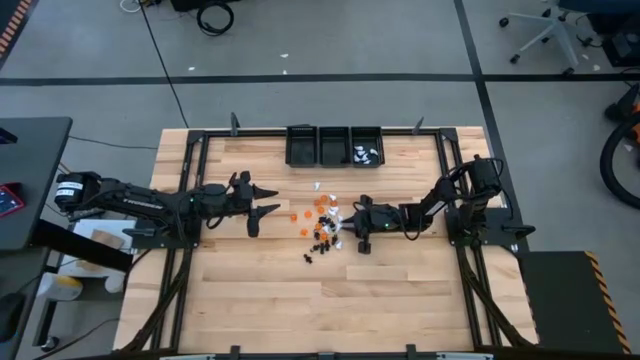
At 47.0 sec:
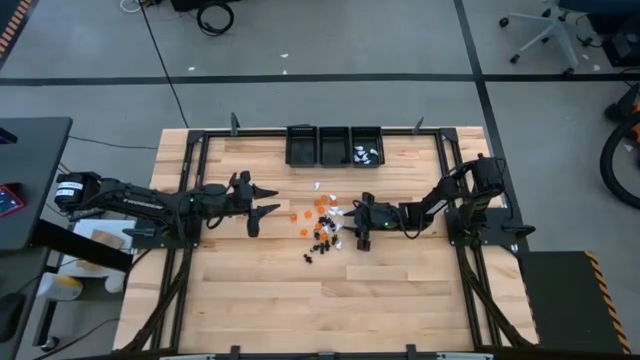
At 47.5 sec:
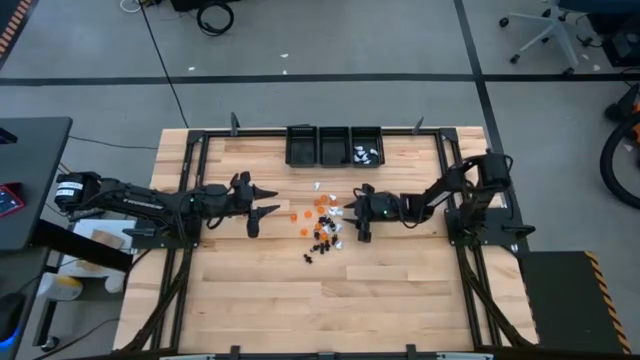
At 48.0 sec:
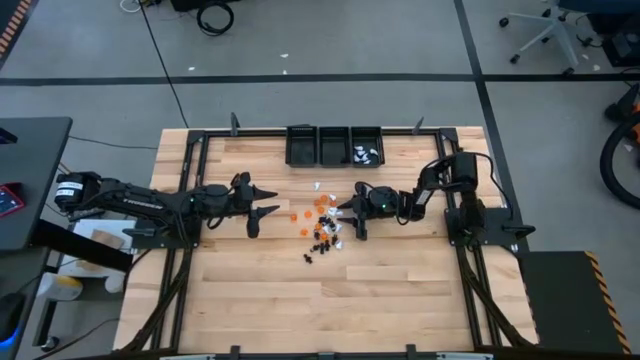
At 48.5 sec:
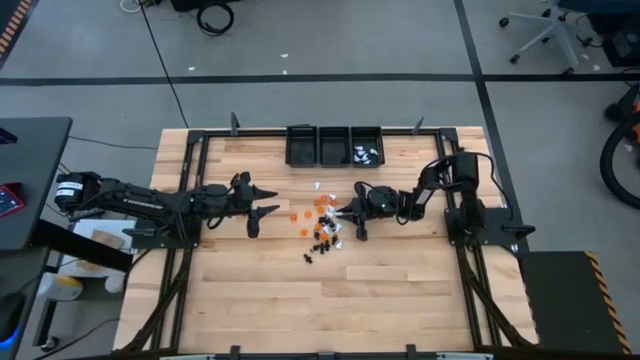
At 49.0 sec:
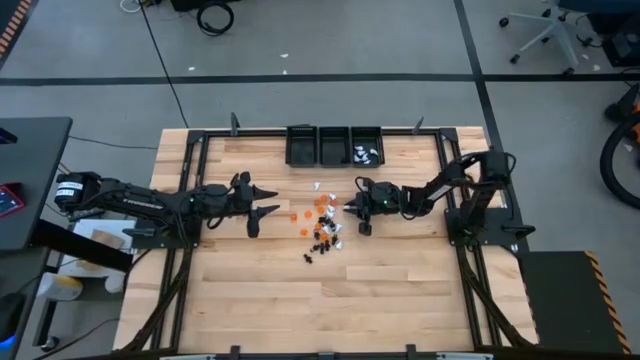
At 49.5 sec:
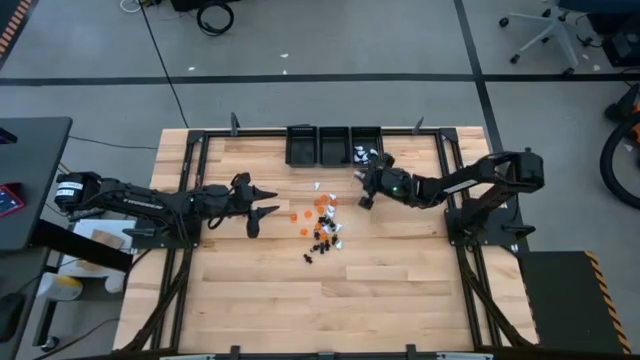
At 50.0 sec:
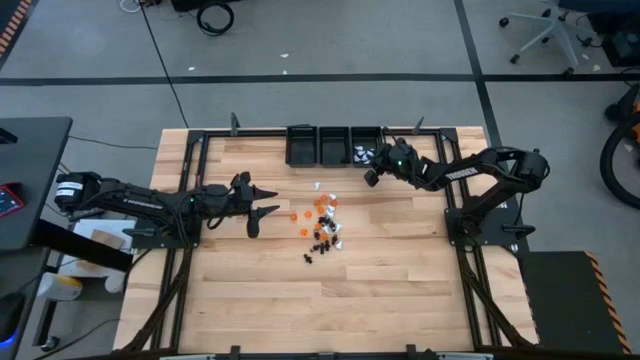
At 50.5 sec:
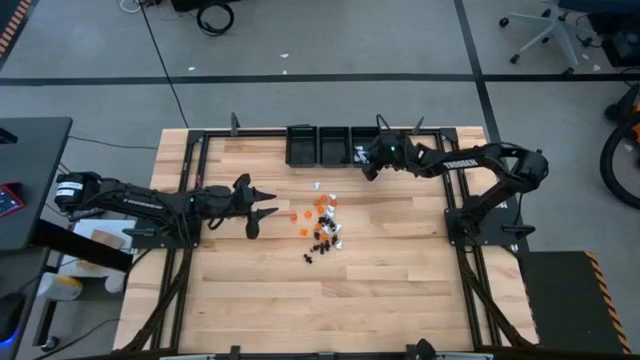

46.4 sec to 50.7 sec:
Task: Sort game pieces by color
Put the white game piece into the right black basket

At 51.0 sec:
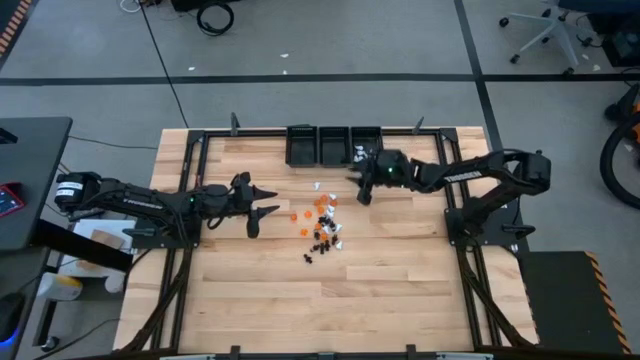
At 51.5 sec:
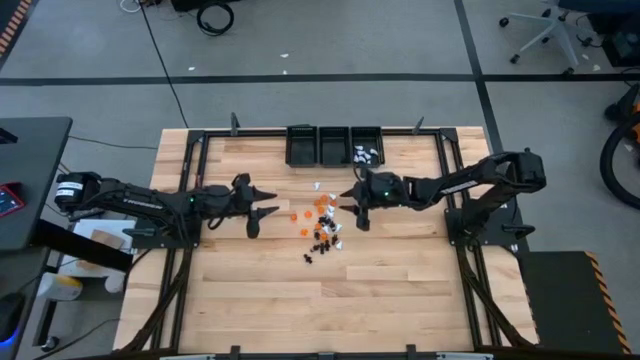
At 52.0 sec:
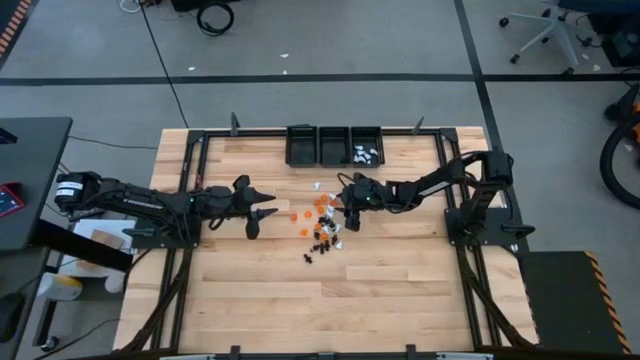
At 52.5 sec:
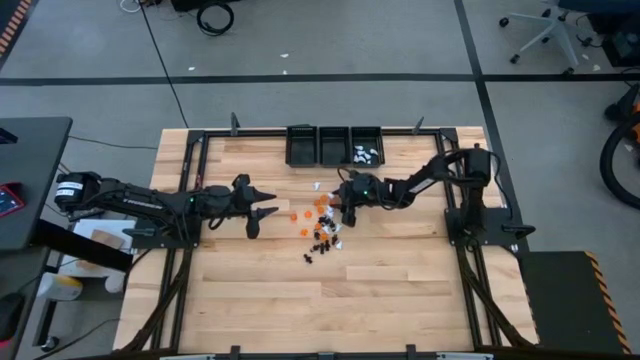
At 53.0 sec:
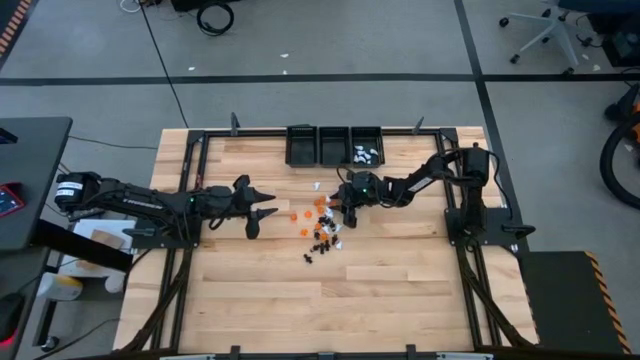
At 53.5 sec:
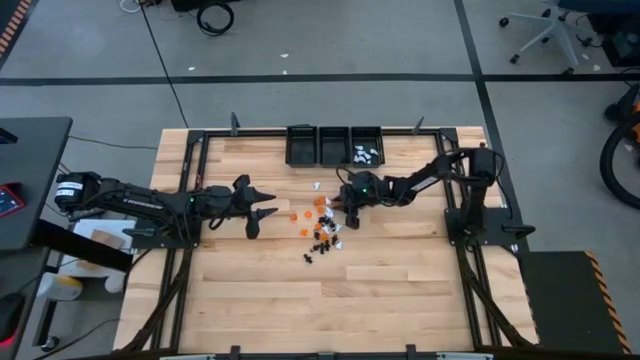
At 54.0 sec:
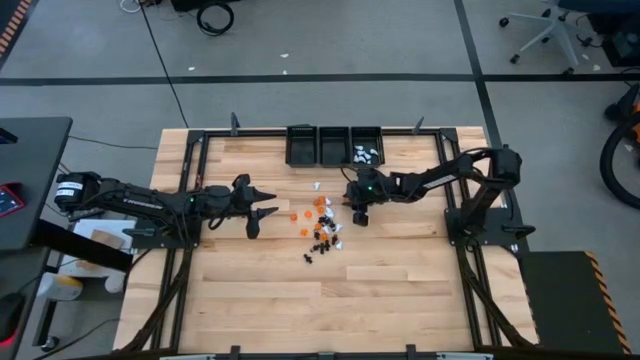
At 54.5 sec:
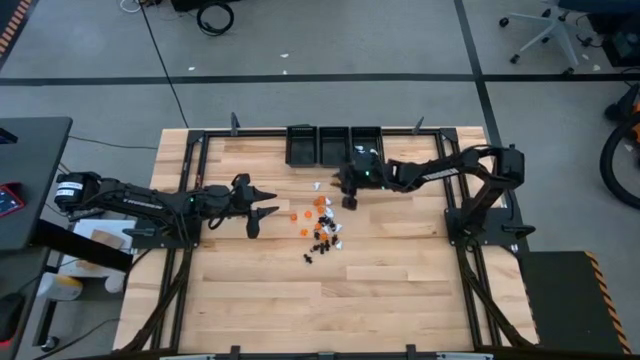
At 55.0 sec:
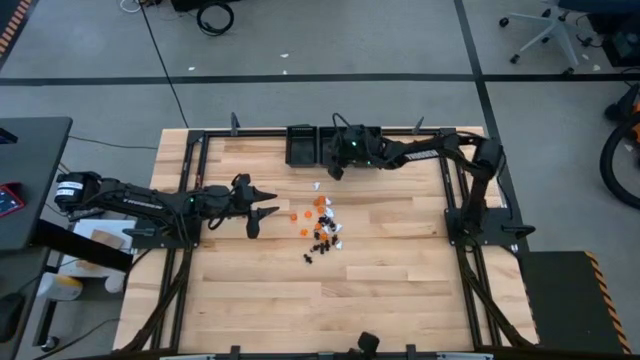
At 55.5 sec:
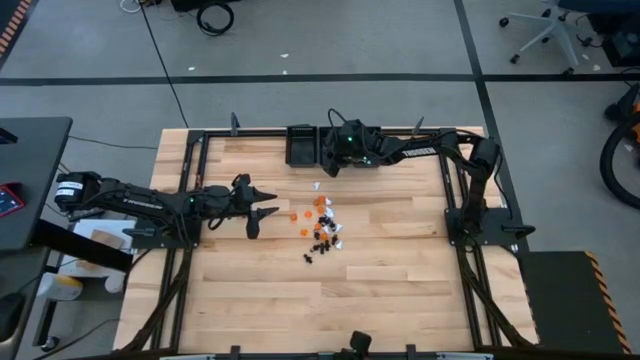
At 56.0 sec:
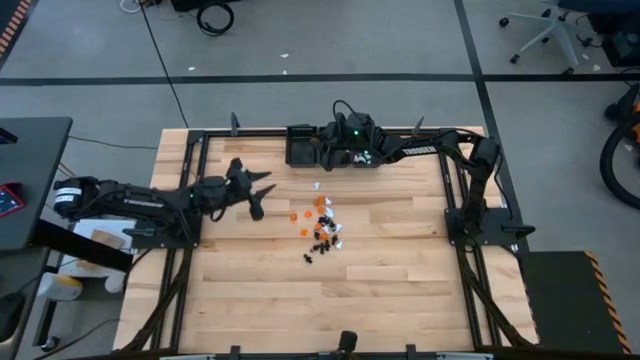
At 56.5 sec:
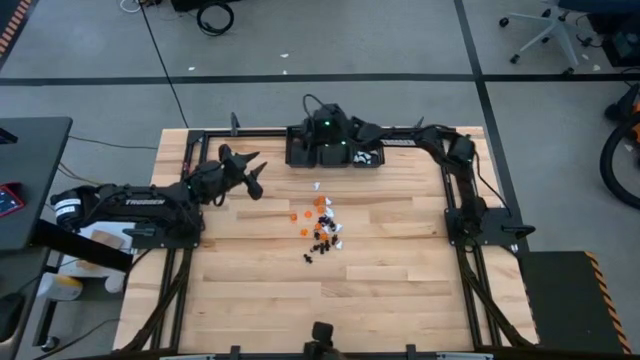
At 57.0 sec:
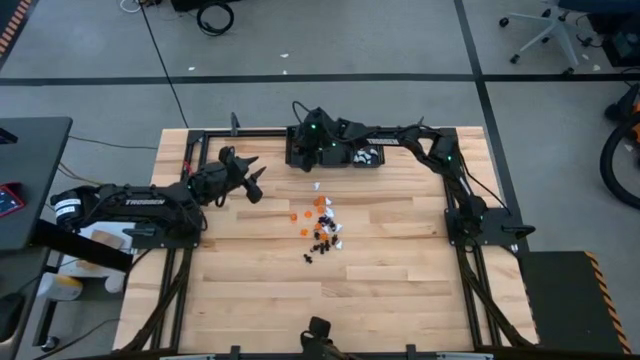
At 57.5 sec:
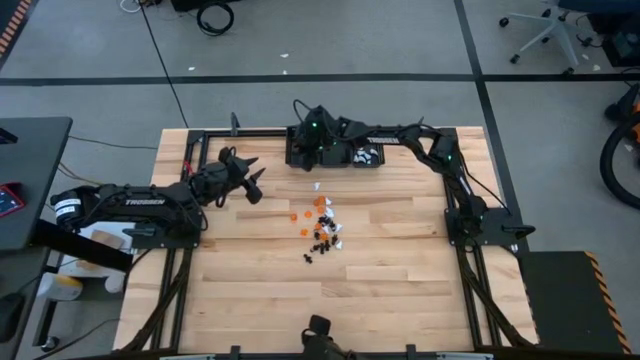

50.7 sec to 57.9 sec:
Put the orange game piece into the left black basket

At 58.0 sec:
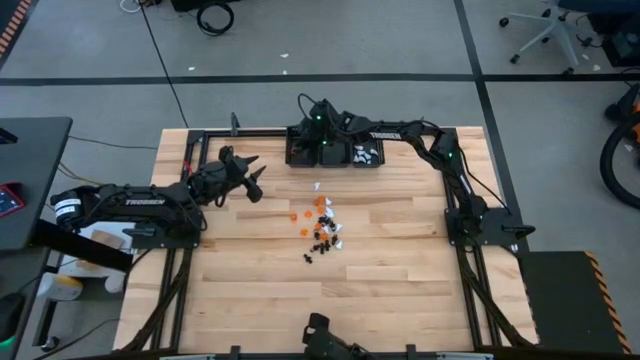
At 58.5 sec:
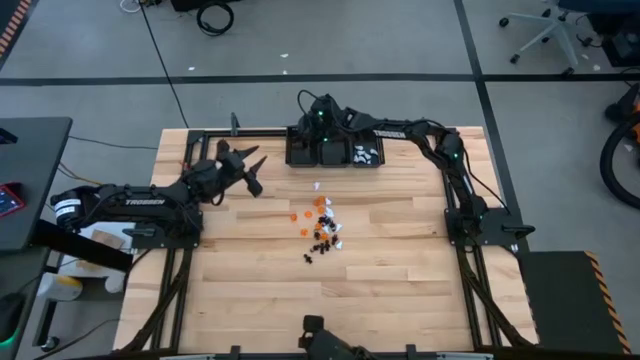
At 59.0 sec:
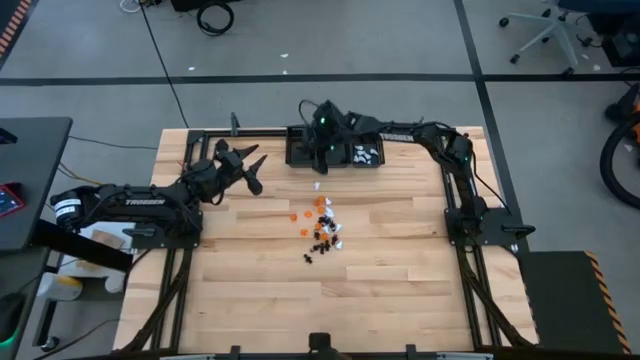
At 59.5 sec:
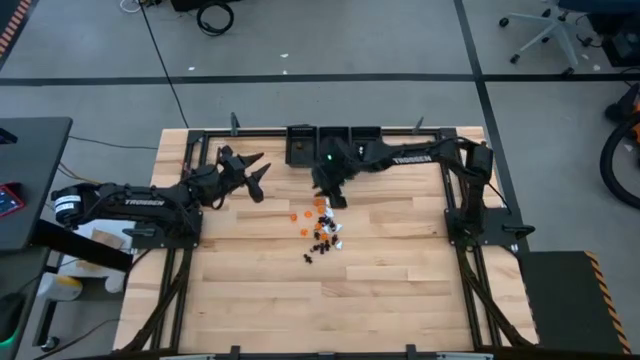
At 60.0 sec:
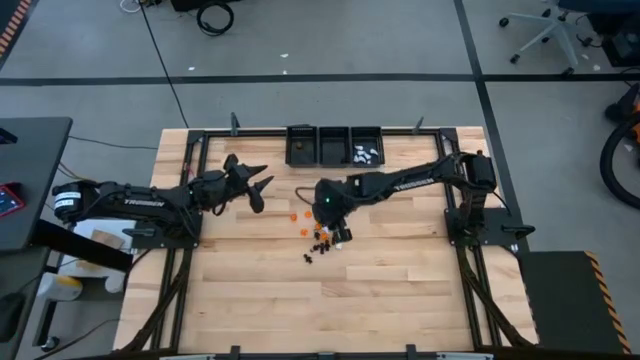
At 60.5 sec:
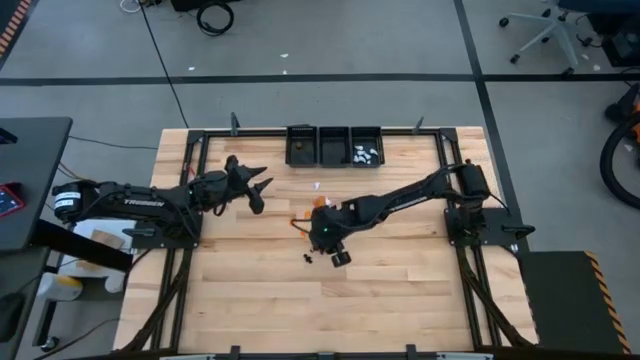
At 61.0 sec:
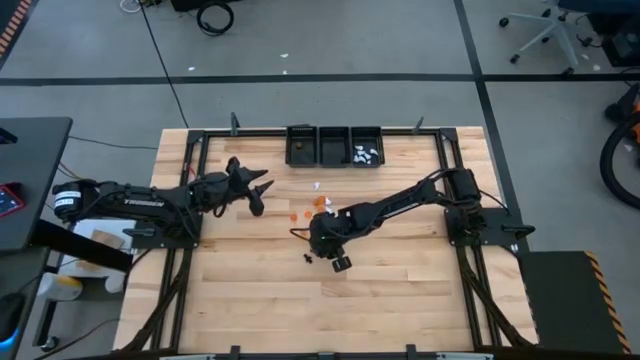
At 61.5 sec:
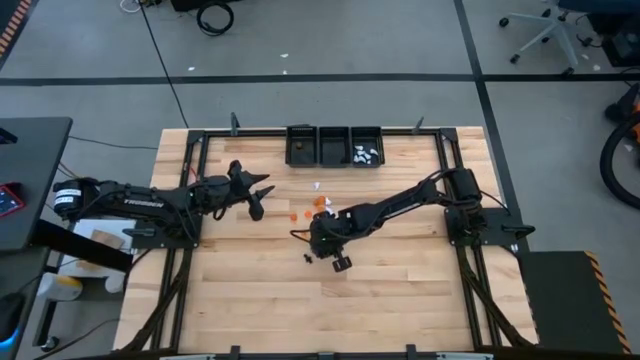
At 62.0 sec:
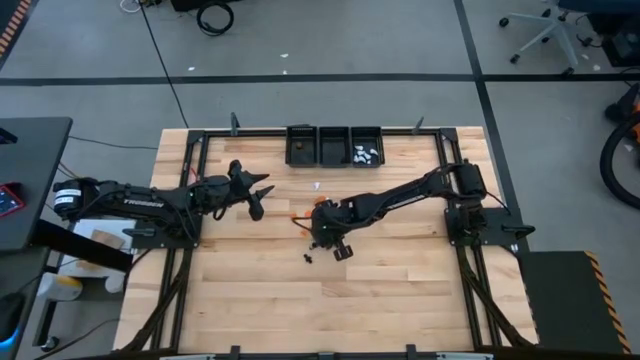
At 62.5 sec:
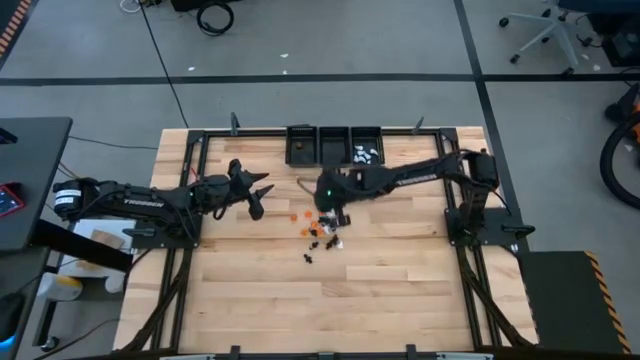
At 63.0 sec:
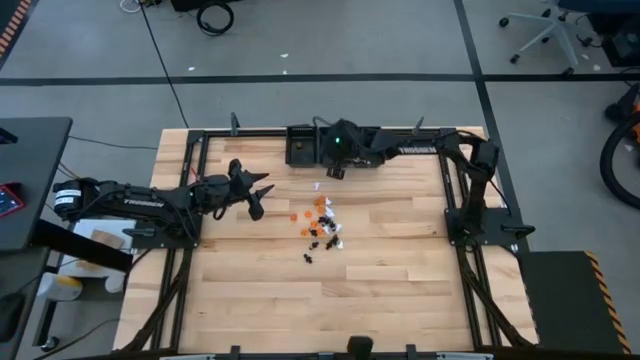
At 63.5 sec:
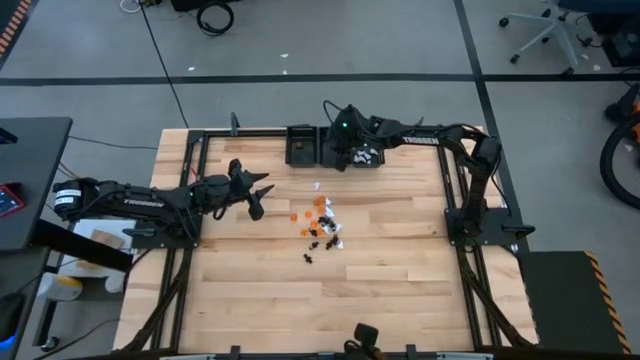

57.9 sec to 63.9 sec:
Put the black game piece into the center black basket

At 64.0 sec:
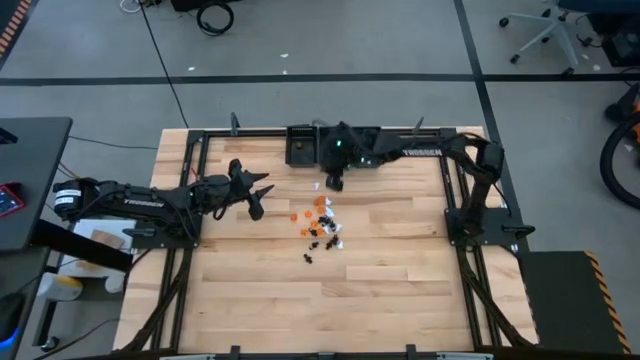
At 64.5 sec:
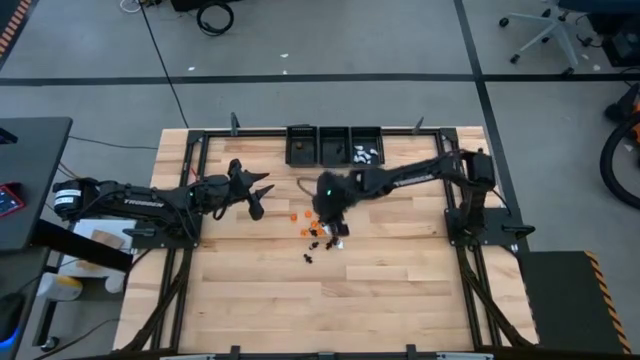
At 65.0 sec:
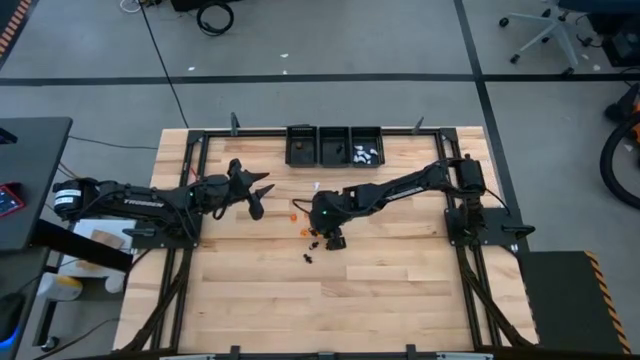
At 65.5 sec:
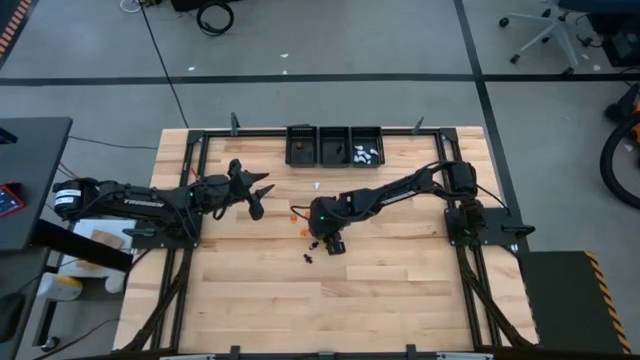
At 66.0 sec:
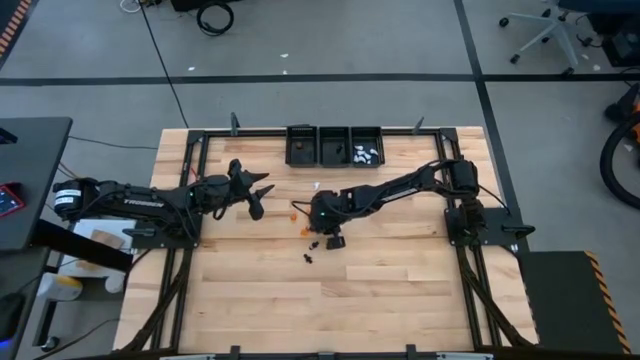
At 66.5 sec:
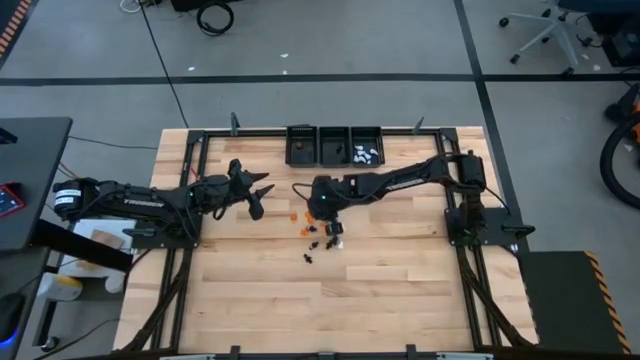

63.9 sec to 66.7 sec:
Put the orange game piece into the left black basket
